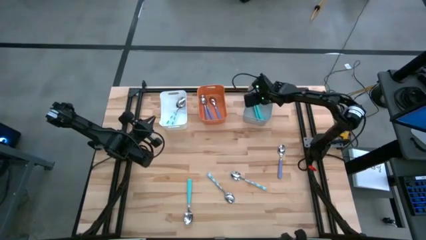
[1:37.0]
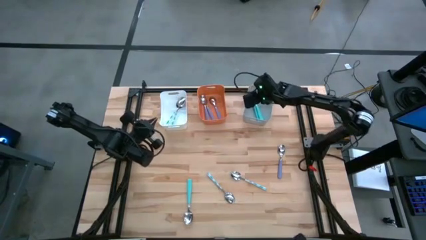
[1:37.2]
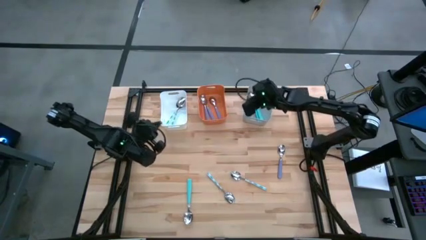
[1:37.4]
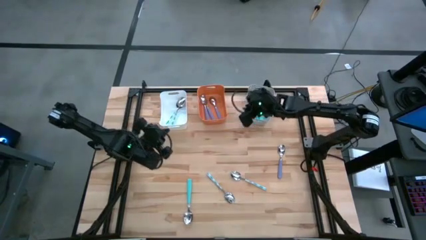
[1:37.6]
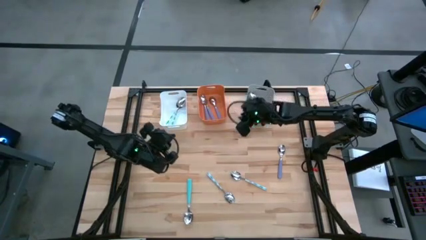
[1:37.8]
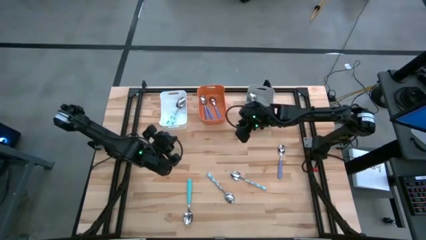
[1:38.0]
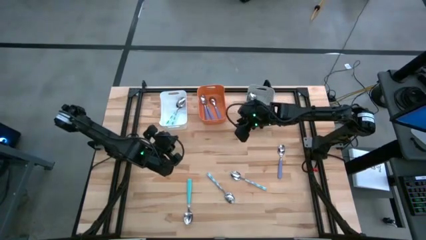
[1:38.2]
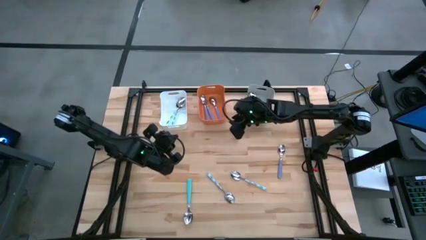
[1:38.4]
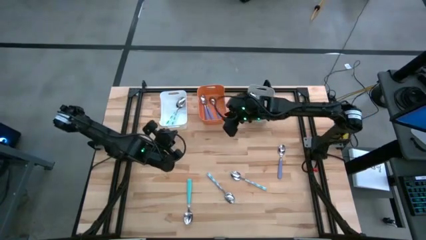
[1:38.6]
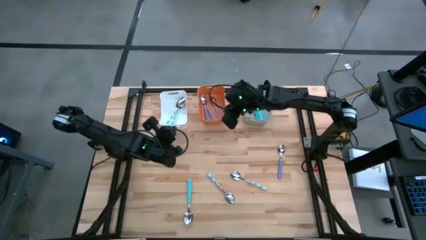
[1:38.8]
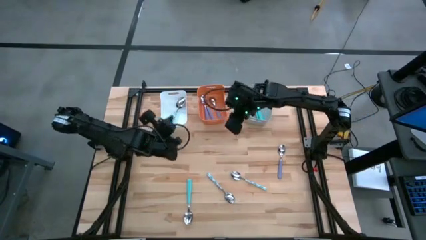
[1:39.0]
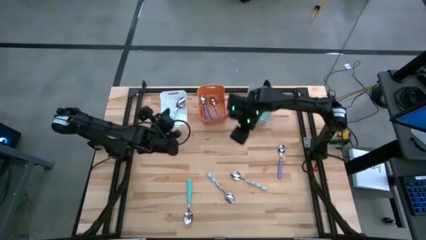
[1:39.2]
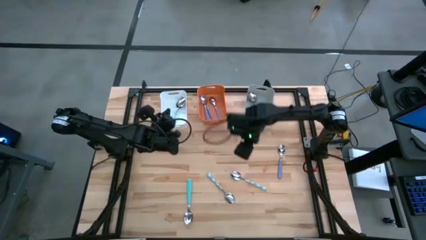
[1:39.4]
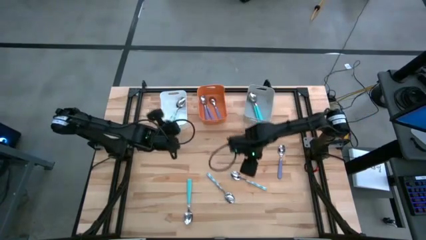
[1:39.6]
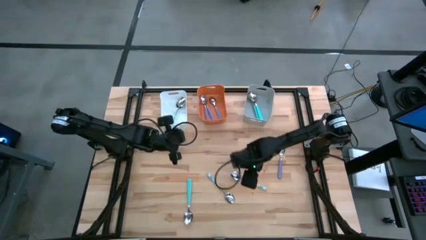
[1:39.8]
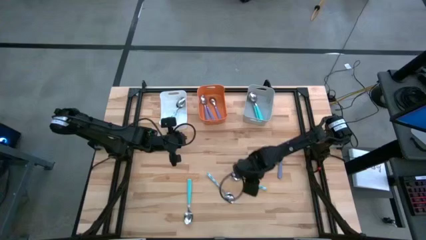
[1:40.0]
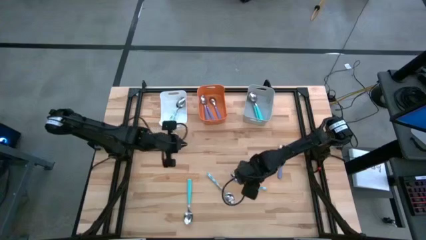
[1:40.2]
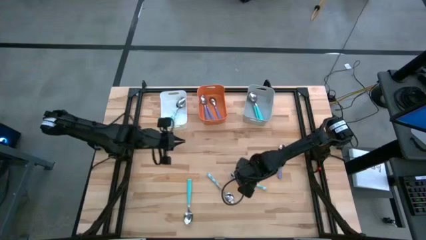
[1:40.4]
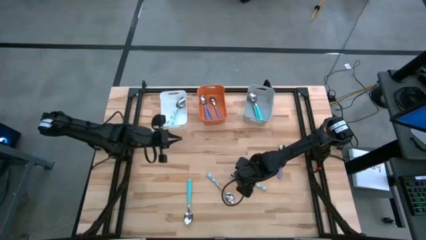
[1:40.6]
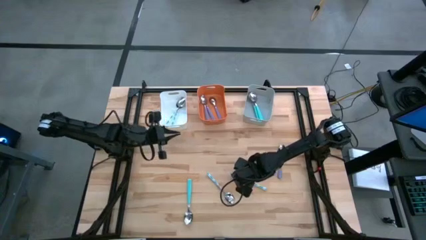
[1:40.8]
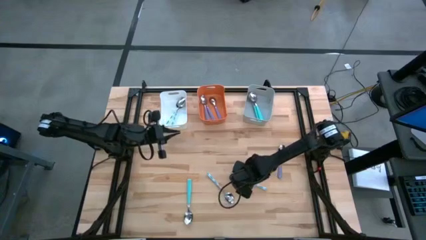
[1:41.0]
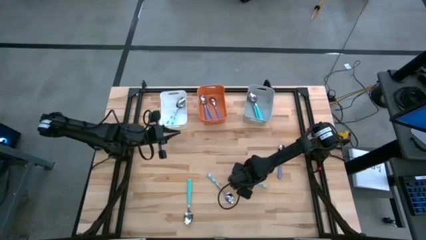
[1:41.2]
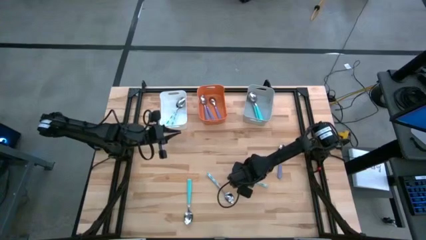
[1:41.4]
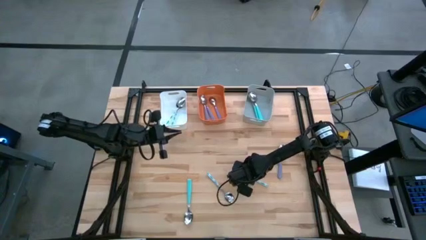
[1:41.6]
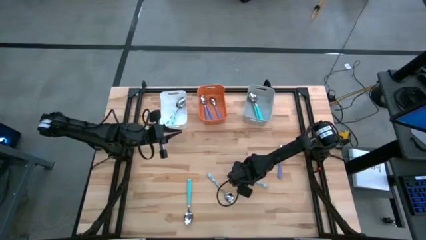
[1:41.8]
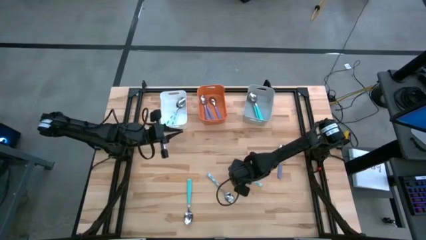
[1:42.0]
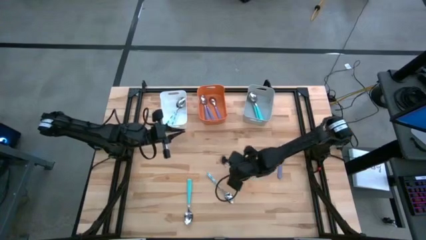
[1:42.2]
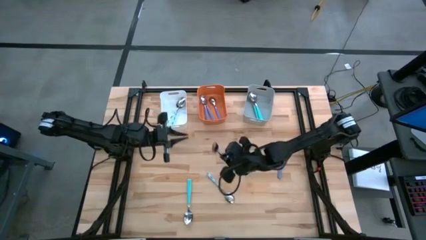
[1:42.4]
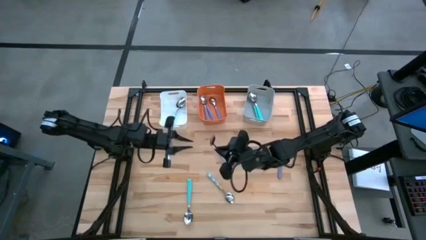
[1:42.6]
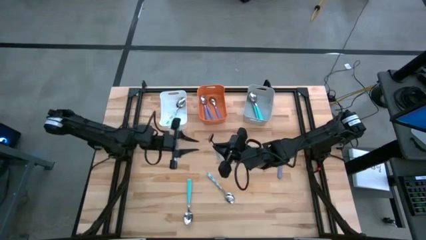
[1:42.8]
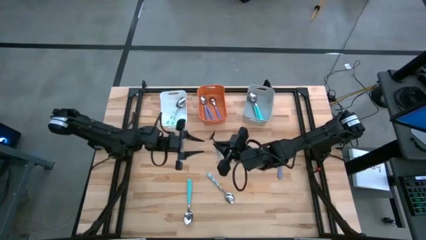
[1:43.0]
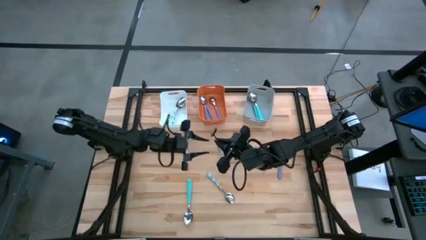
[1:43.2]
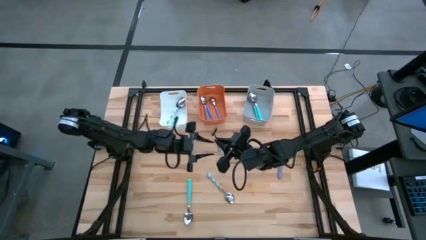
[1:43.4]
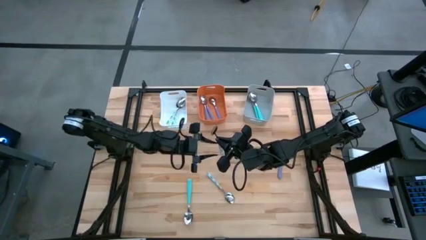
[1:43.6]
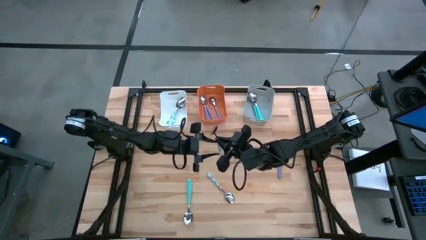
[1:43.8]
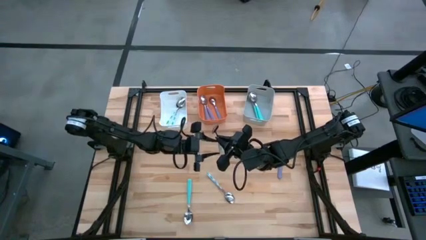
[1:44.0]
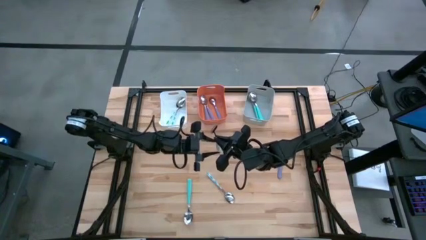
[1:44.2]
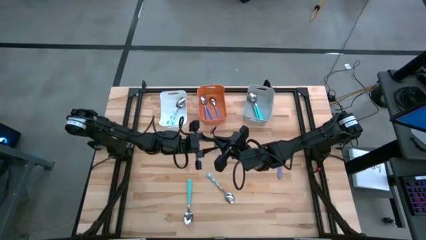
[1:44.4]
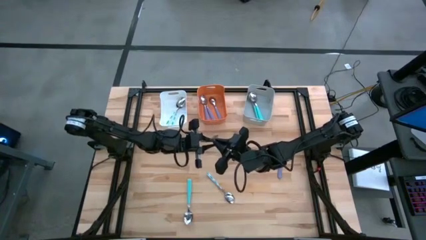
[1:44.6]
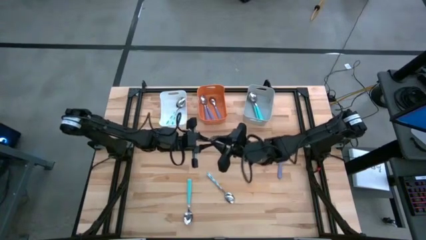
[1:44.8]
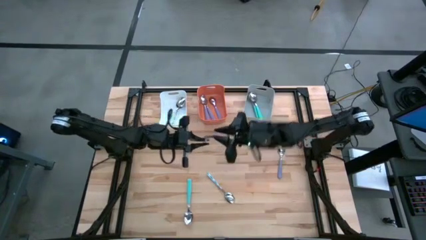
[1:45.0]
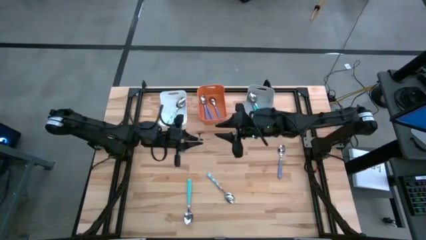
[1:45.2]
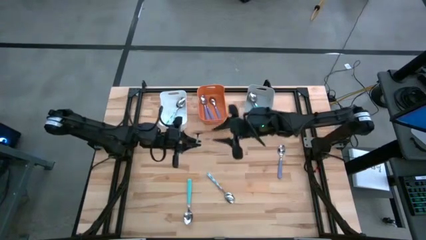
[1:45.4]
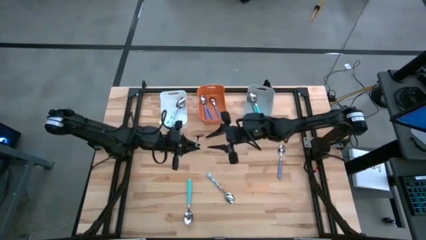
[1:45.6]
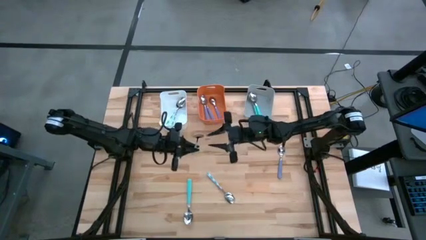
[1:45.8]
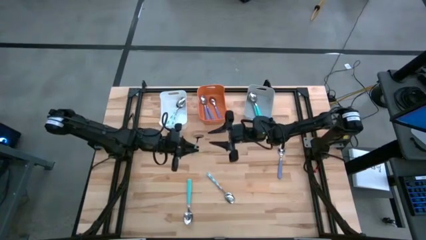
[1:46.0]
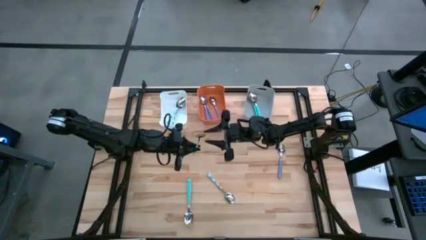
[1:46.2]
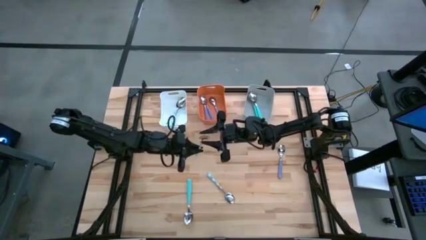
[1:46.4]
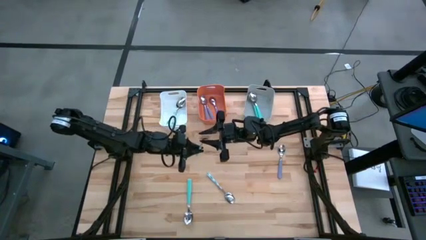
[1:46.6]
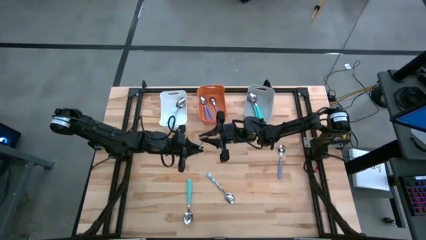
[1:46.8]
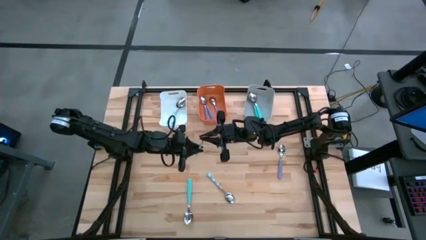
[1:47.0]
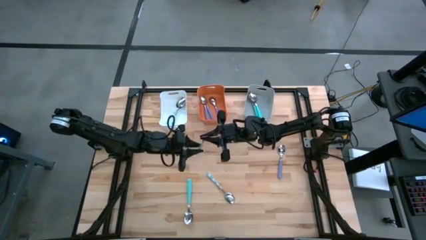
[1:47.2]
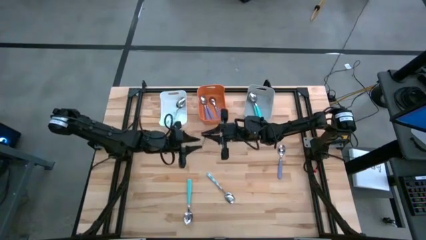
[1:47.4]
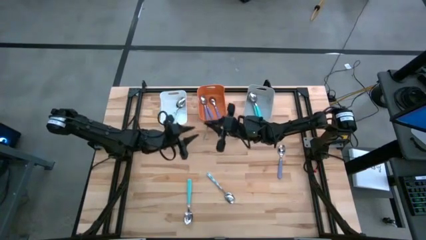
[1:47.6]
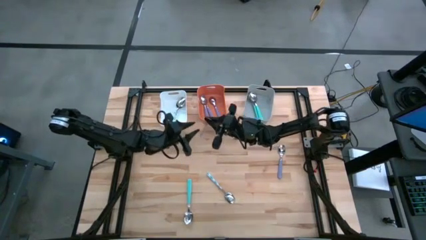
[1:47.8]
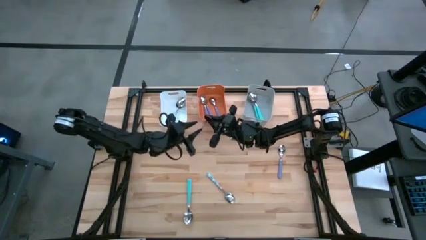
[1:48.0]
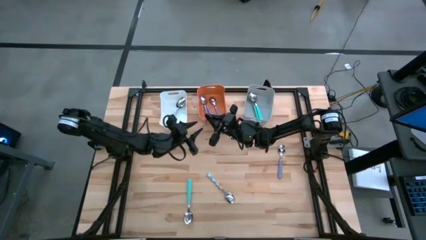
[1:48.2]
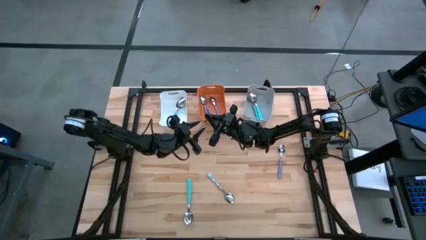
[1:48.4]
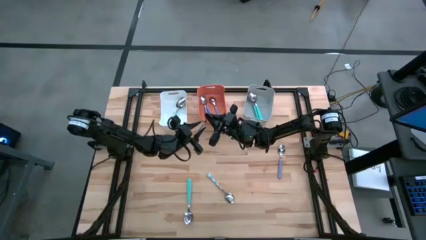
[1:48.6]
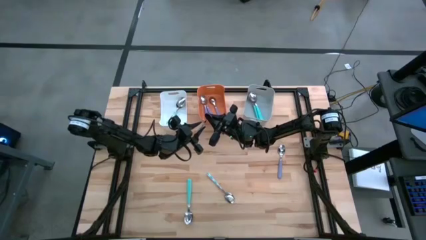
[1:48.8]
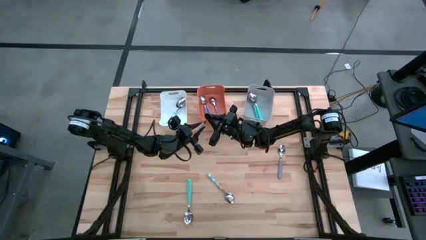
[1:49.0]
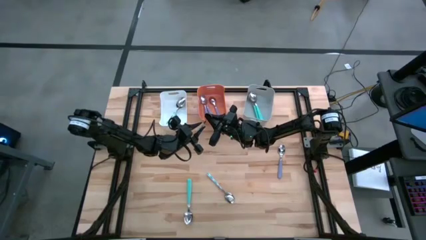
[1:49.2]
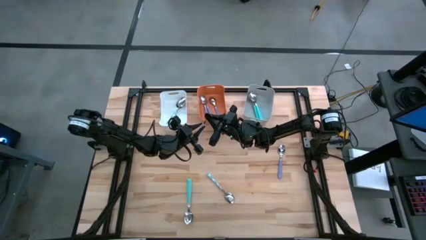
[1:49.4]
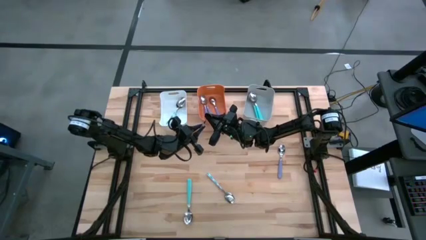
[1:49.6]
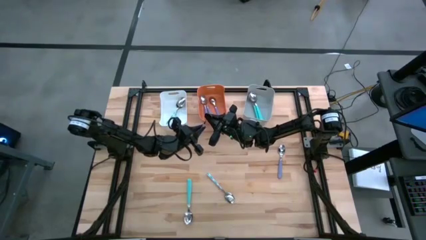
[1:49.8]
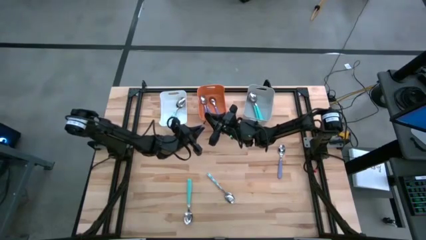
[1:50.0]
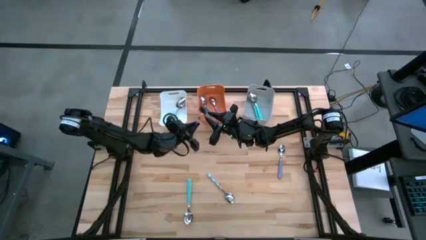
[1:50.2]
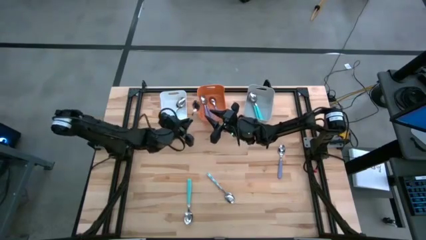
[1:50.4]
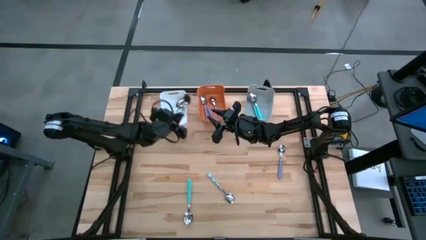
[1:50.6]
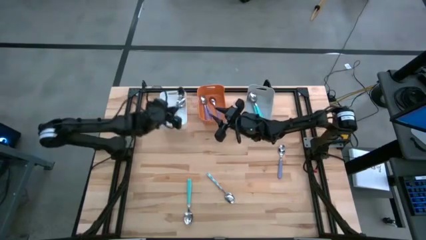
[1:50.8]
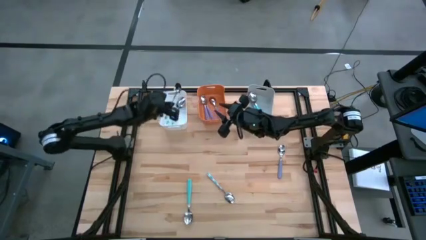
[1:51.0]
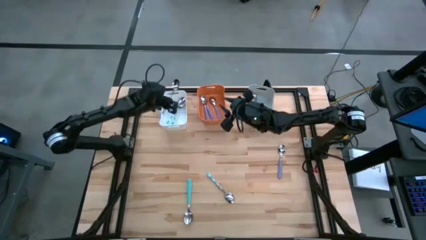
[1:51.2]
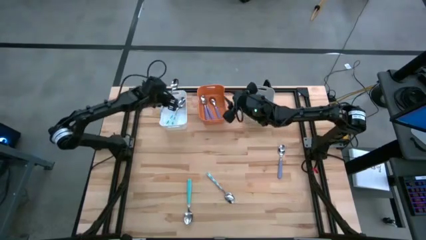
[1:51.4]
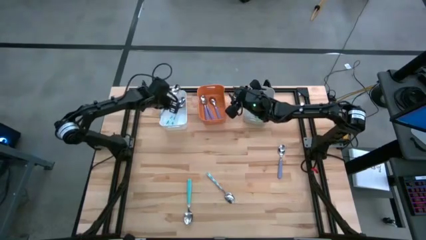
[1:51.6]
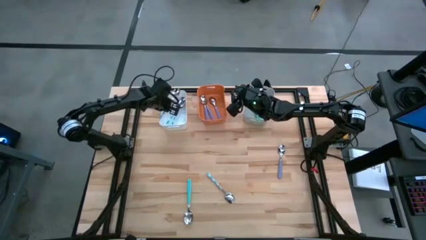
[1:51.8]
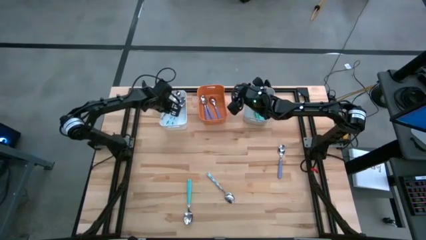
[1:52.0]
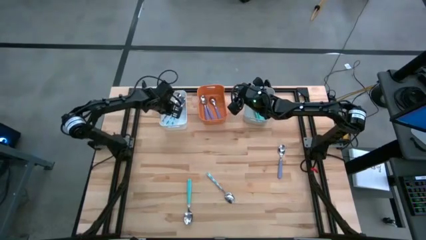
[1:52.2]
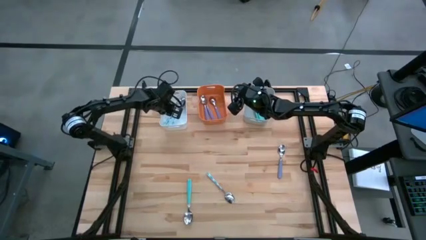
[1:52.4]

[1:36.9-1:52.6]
Task: Sort silverware by color (type)
Put the blue patterned spoon into the white bin
